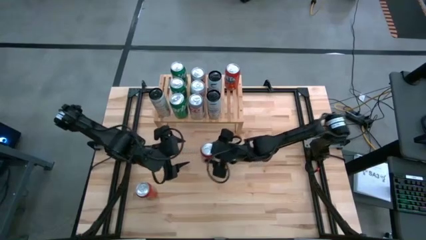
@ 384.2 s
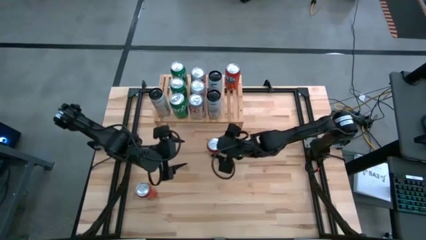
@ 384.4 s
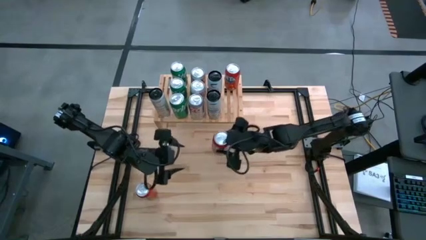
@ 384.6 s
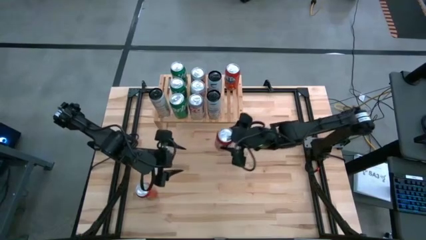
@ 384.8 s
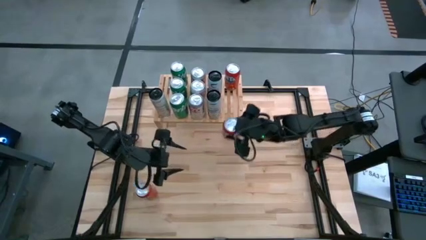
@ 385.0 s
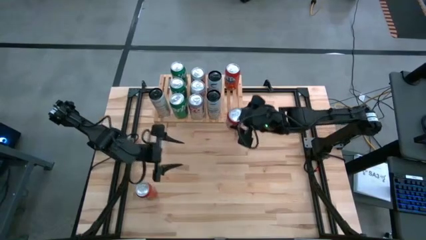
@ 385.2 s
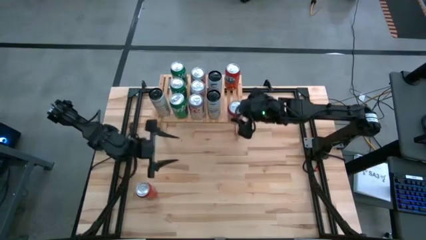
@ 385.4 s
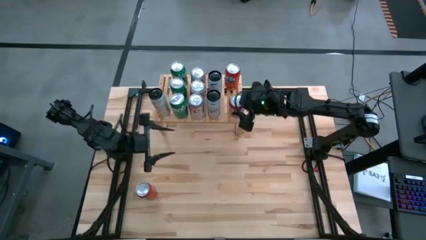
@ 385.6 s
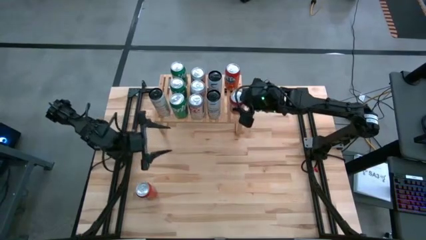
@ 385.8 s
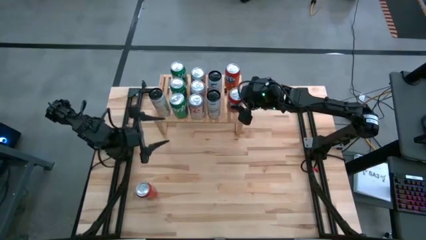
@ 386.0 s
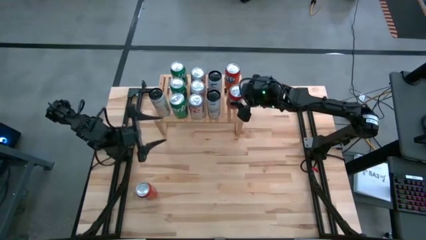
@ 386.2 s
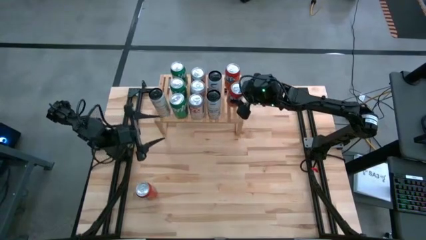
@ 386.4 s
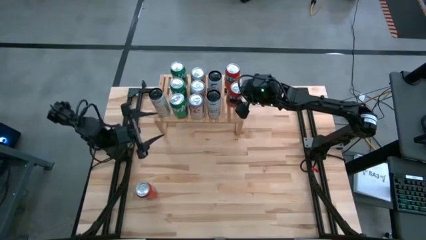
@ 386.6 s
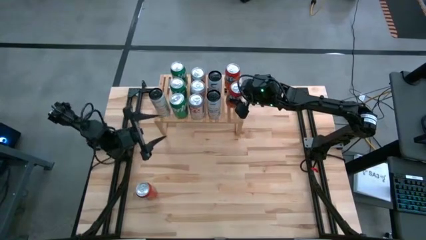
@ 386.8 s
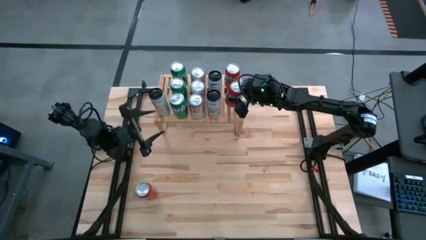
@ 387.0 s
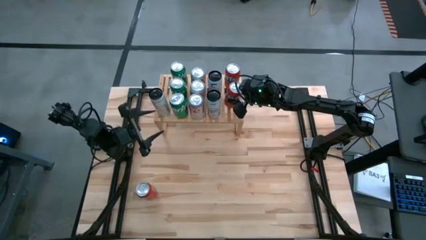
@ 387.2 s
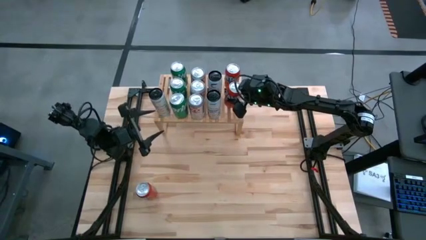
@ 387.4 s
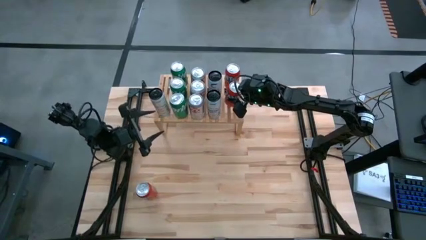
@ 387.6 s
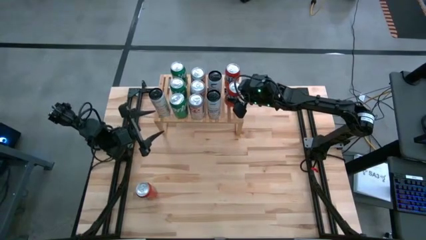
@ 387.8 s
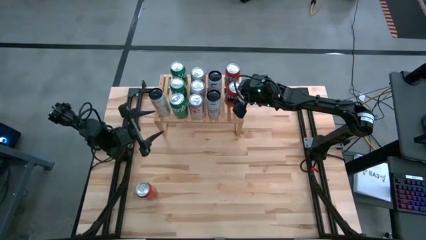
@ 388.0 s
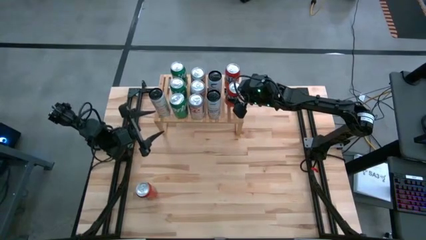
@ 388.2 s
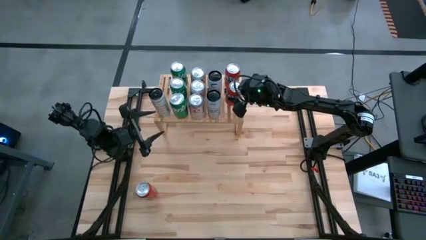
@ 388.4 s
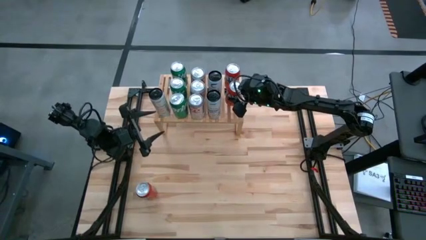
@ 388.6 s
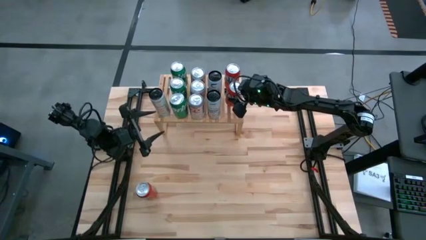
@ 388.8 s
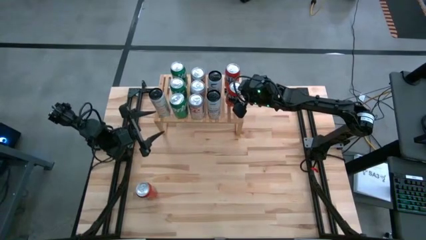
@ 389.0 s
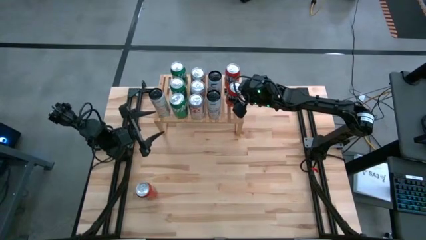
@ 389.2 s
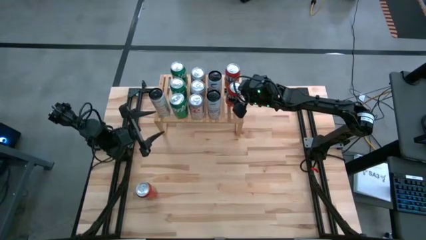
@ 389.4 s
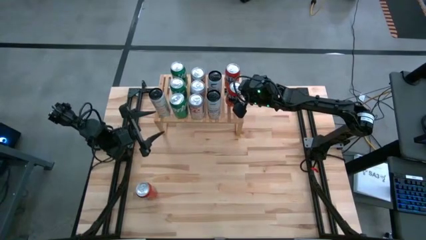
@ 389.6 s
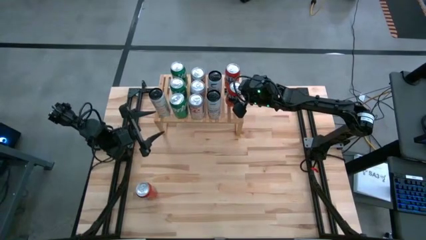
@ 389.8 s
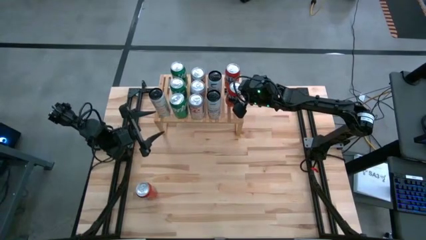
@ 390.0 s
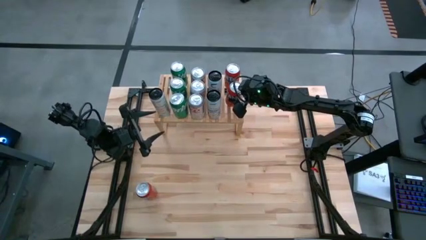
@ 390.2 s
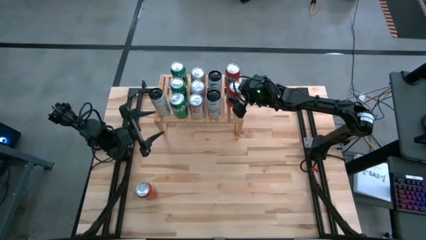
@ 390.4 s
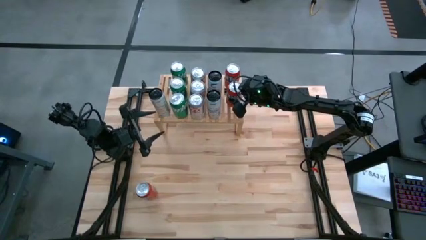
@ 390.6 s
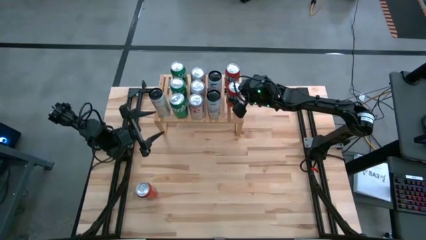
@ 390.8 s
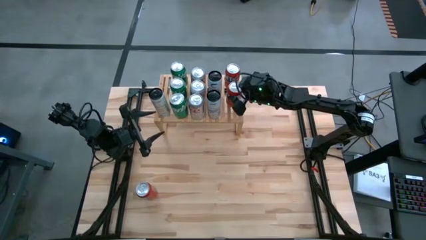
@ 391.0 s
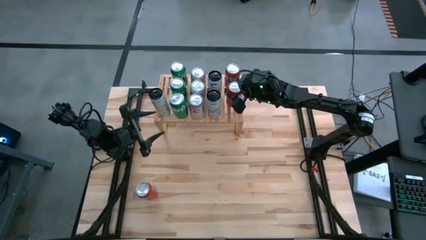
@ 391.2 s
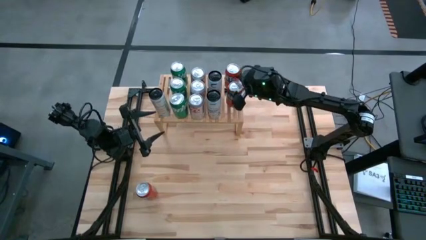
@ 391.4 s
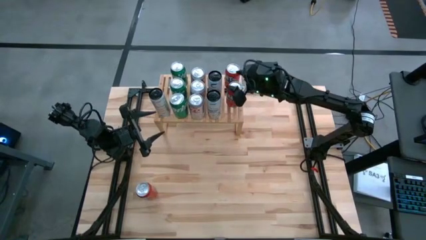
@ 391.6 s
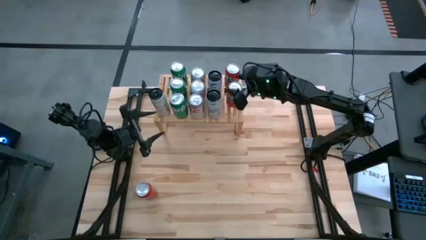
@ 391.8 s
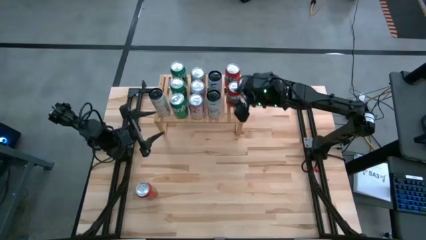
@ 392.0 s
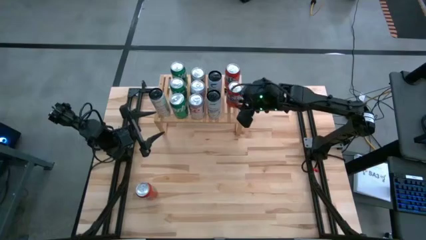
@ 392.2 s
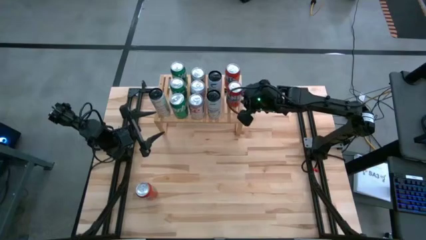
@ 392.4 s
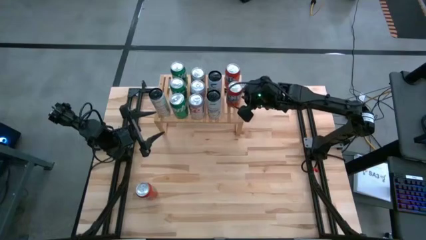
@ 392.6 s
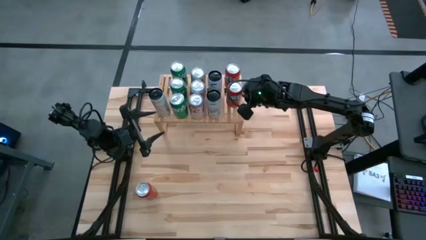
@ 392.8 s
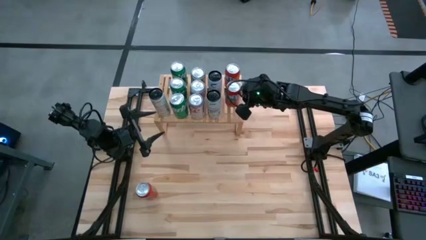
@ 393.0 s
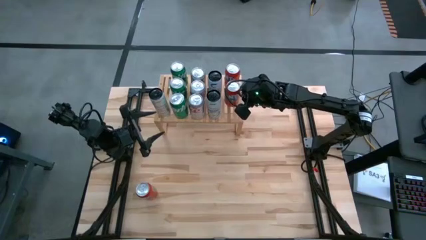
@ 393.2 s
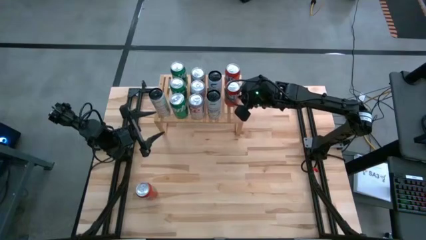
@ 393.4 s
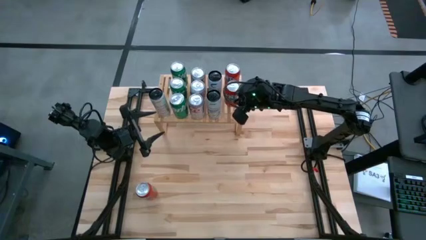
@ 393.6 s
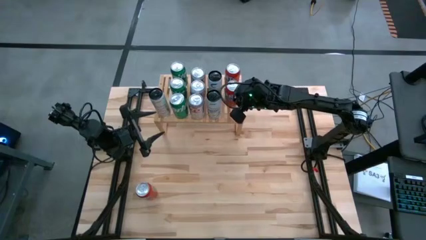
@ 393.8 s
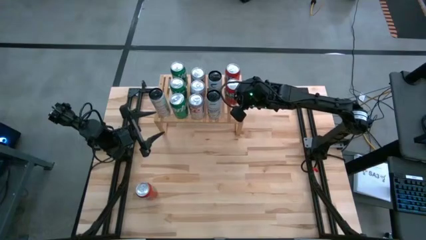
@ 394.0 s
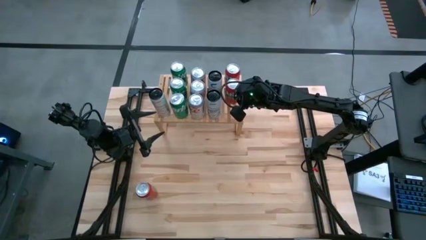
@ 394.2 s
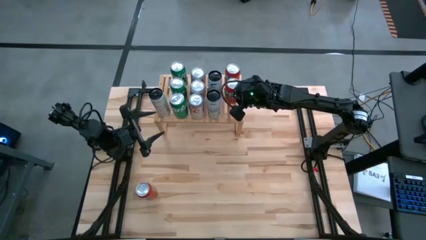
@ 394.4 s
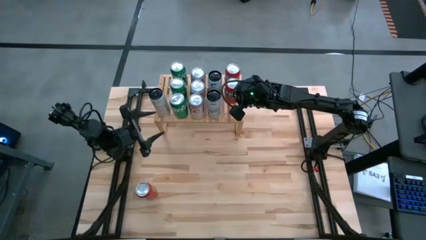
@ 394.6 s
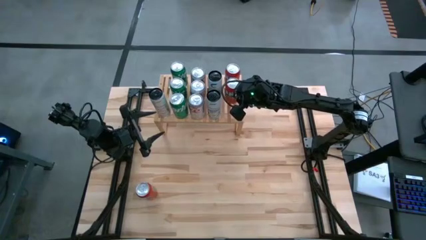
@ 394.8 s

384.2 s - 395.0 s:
Task: Place canned beverage on shelf
Put the top left orange soda can on the shelf

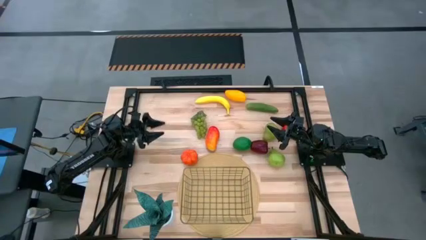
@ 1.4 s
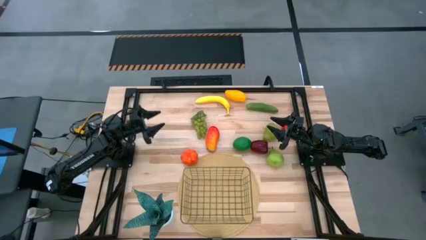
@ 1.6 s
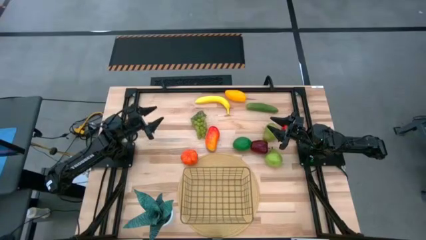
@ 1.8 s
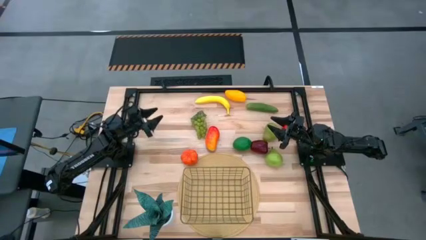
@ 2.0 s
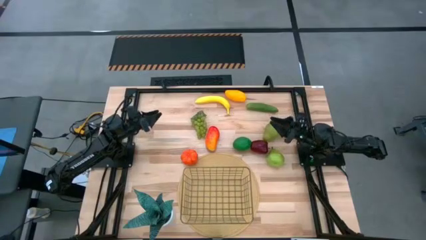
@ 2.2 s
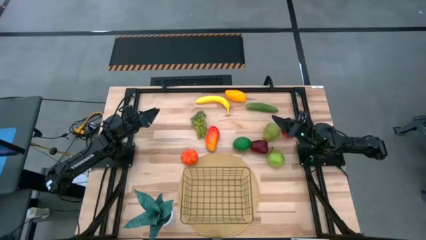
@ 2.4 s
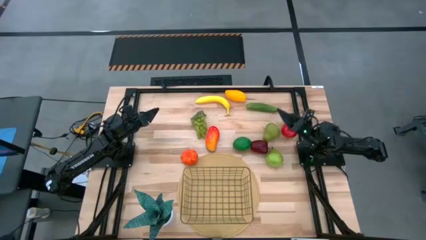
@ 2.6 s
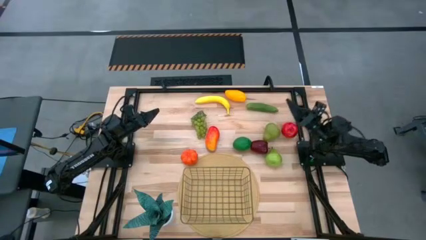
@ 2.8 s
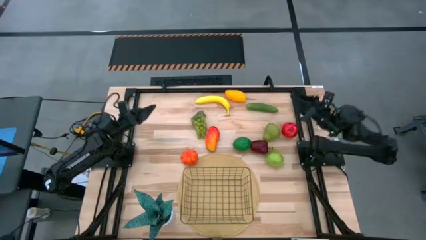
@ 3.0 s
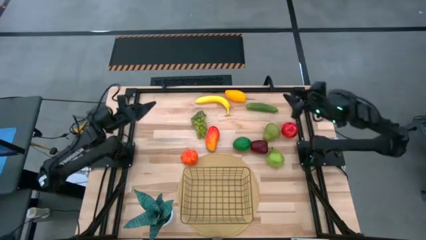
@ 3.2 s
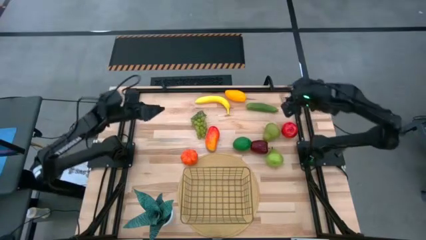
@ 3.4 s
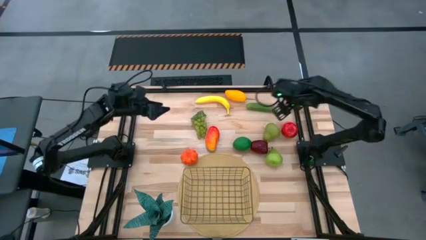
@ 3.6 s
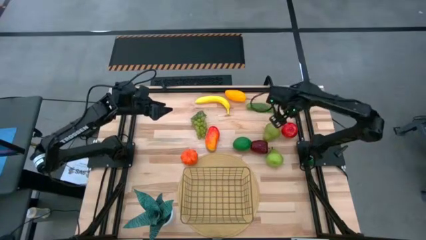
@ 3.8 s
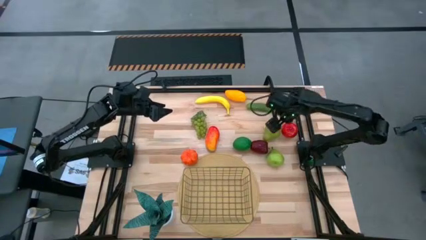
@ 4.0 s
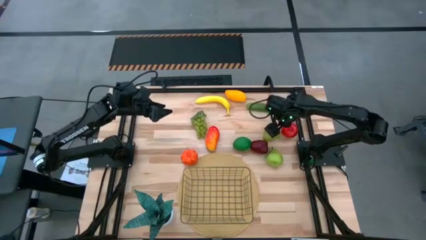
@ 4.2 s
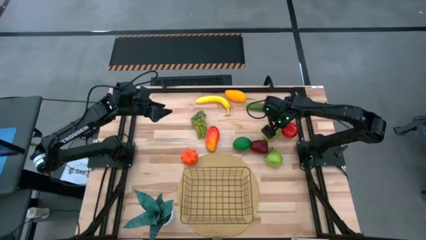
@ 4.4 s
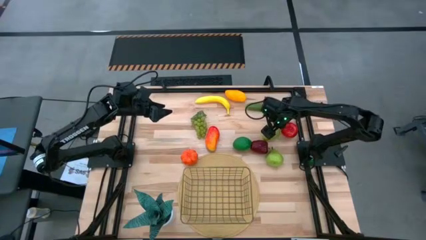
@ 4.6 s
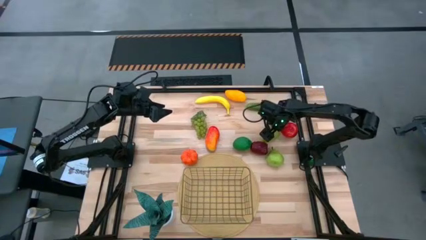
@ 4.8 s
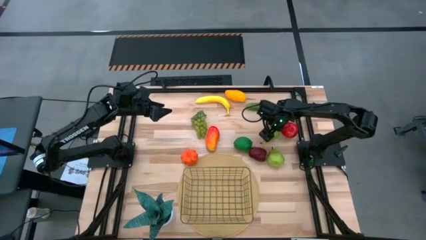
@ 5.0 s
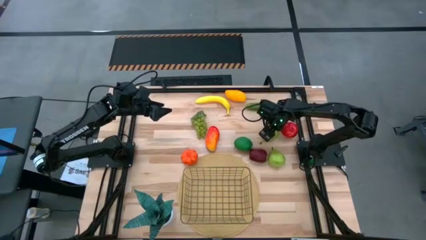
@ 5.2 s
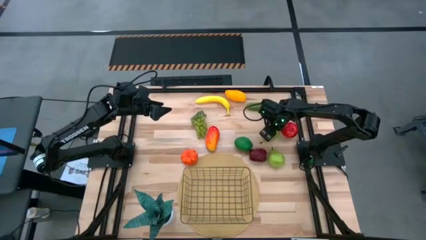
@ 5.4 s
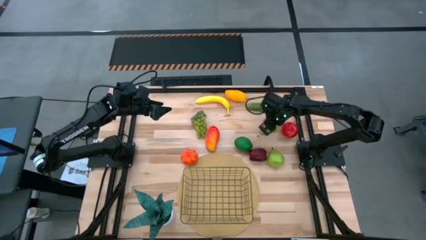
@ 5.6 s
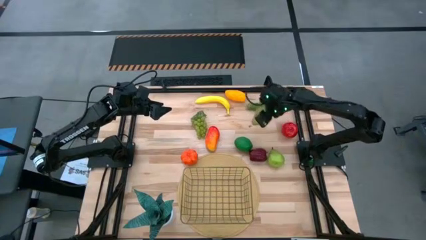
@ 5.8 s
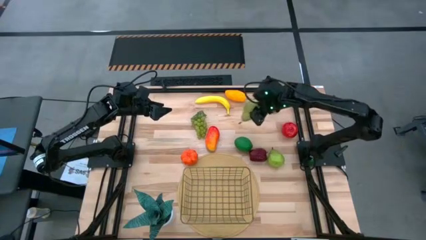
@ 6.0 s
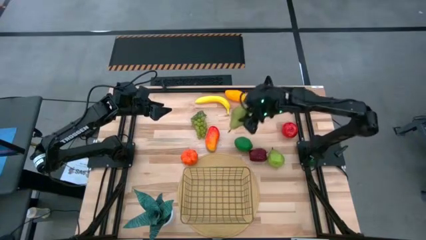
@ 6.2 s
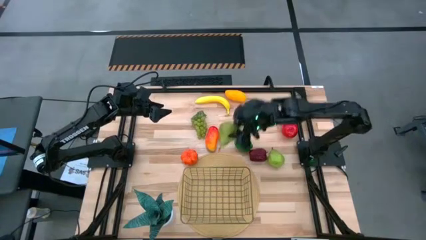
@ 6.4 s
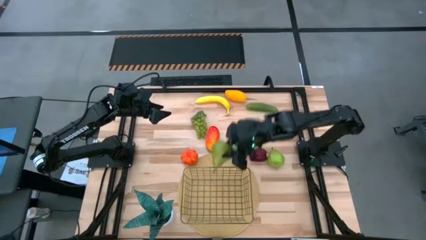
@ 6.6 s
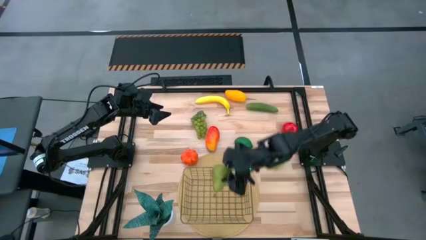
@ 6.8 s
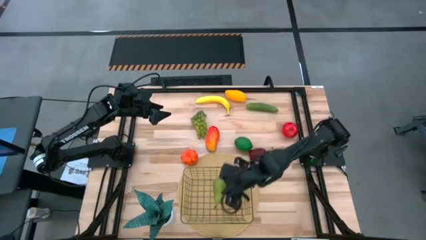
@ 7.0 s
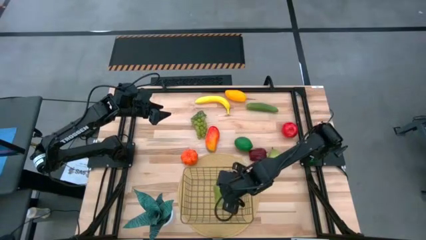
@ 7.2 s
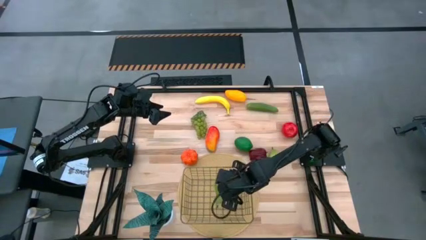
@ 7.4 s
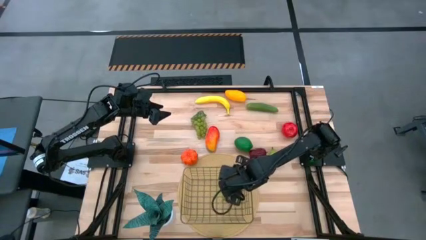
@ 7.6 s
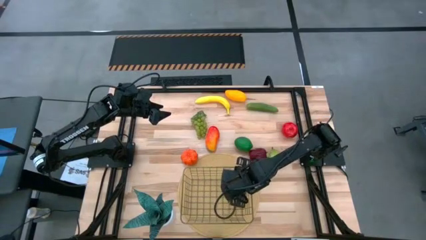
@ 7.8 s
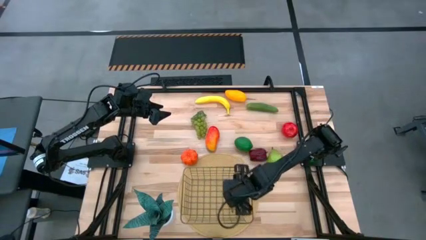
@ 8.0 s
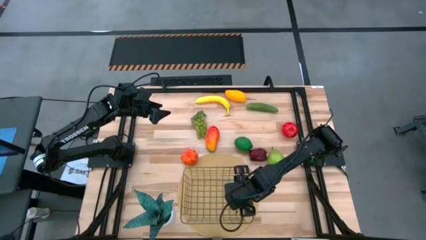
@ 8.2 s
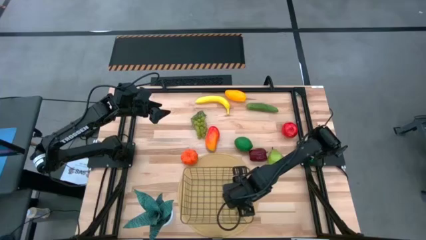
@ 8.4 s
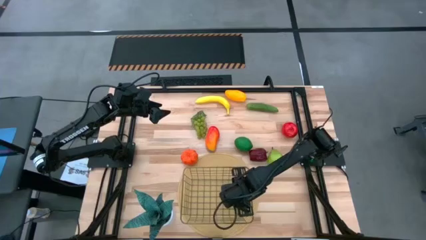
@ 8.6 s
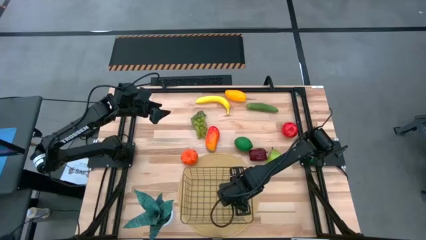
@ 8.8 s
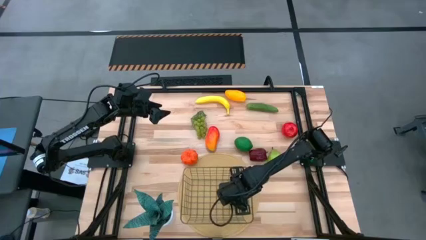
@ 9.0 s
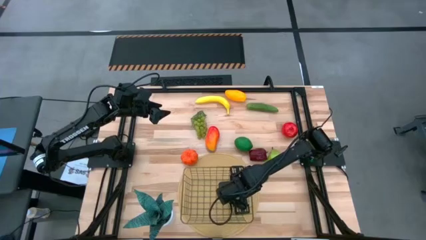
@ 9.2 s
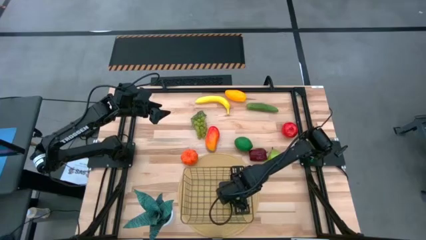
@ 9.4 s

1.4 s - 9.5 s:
Task: Build produce basket
Put the top pear into the wire basket
